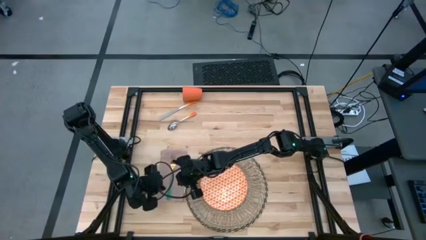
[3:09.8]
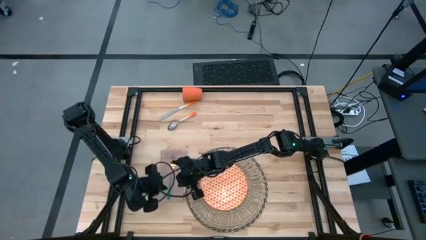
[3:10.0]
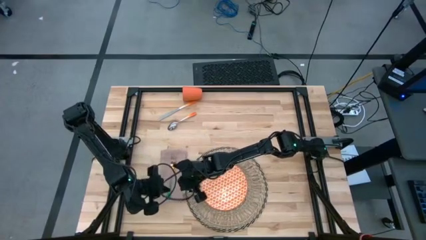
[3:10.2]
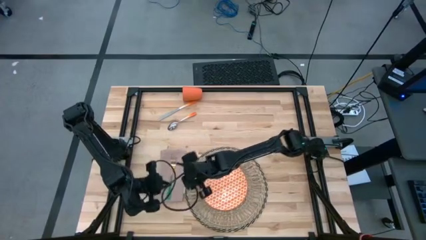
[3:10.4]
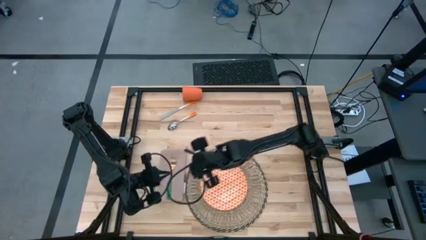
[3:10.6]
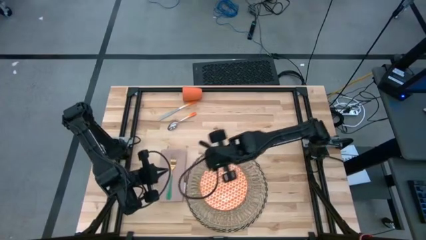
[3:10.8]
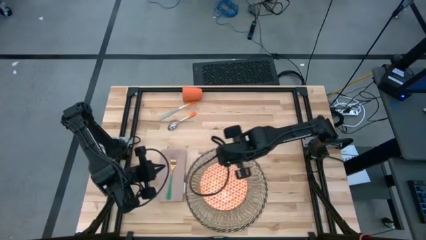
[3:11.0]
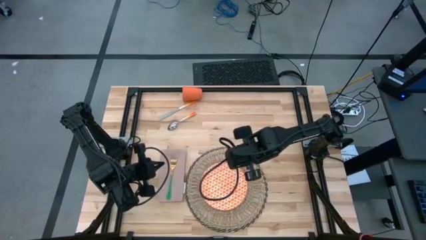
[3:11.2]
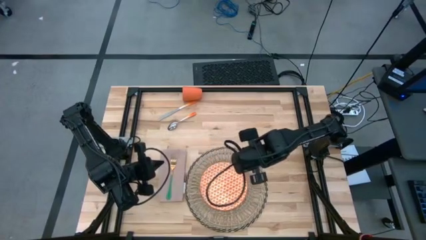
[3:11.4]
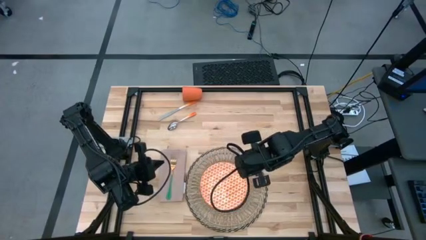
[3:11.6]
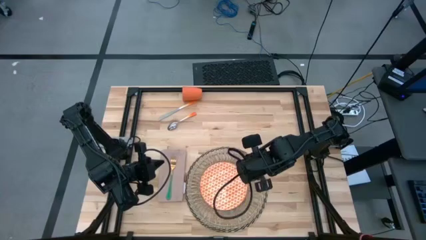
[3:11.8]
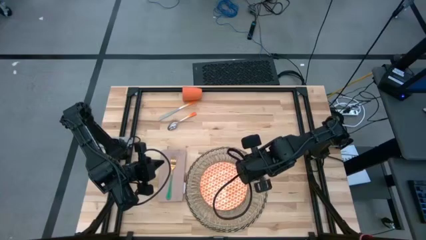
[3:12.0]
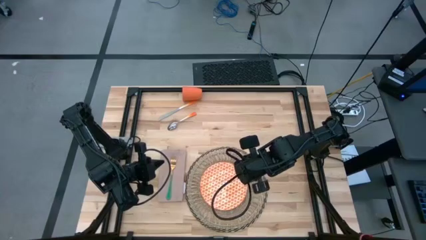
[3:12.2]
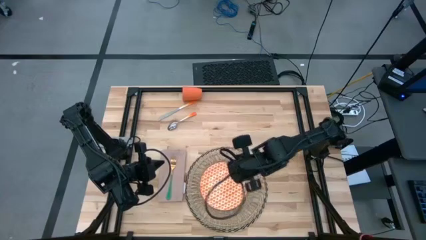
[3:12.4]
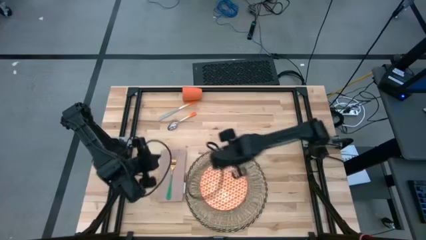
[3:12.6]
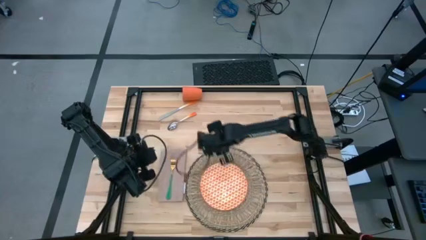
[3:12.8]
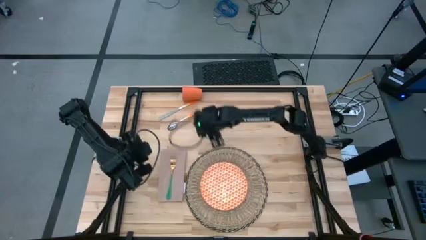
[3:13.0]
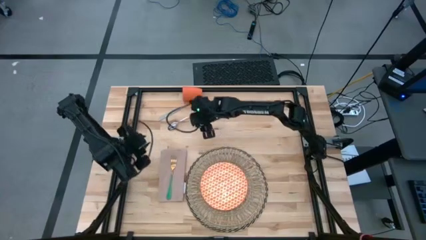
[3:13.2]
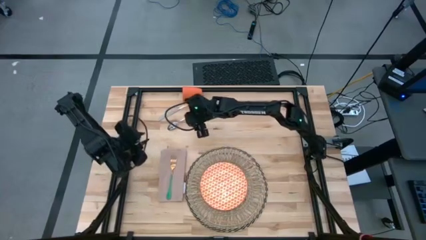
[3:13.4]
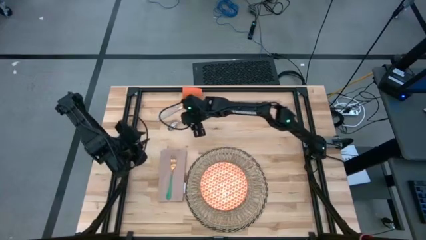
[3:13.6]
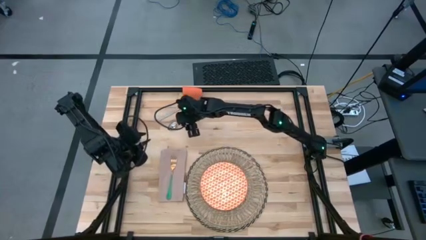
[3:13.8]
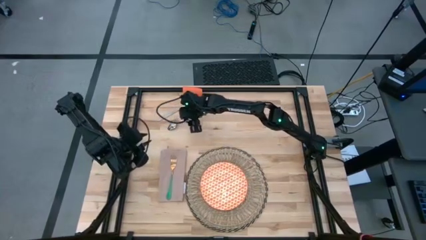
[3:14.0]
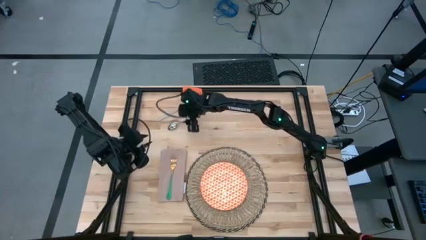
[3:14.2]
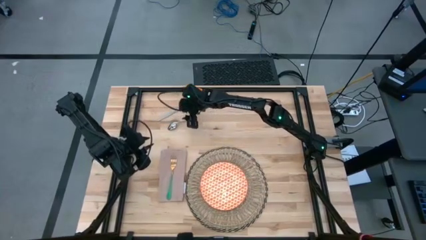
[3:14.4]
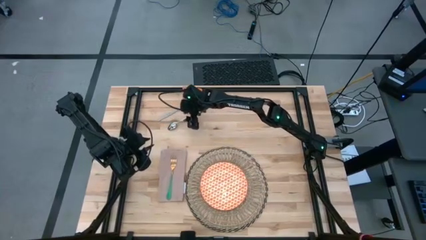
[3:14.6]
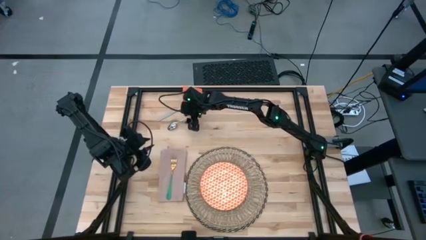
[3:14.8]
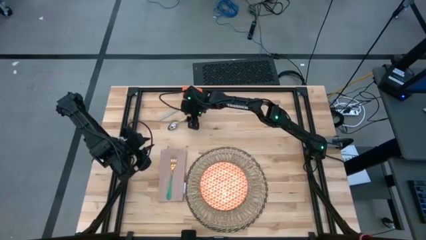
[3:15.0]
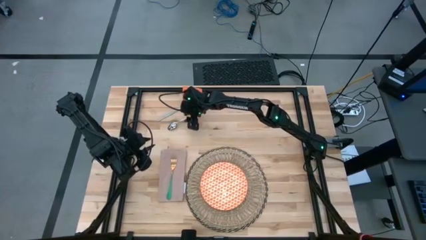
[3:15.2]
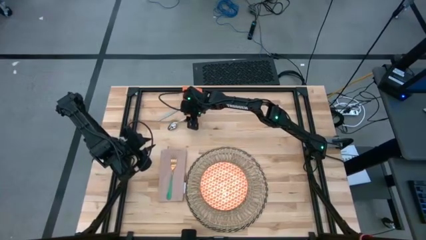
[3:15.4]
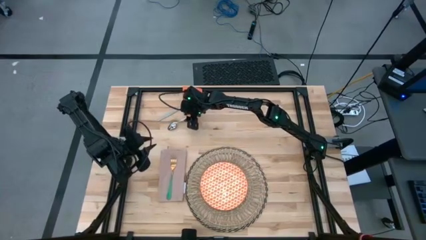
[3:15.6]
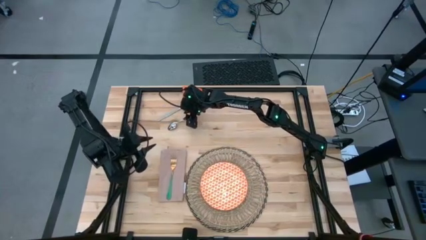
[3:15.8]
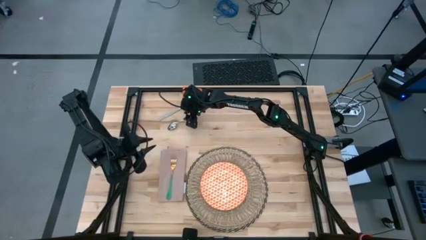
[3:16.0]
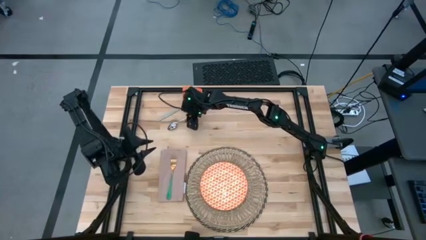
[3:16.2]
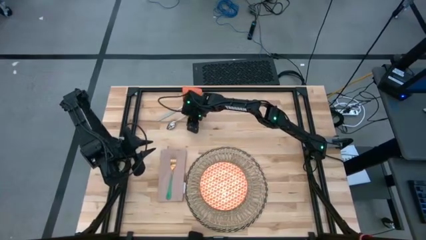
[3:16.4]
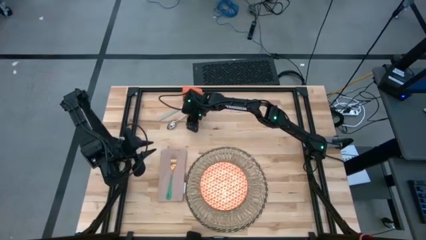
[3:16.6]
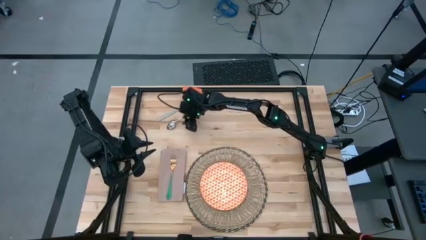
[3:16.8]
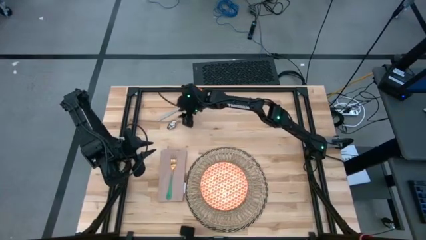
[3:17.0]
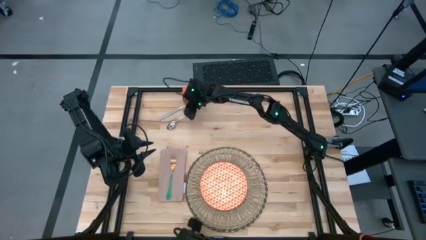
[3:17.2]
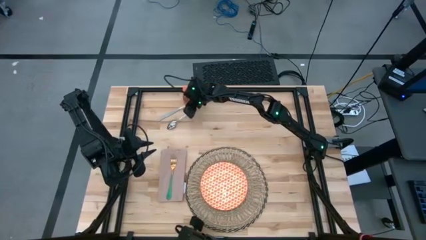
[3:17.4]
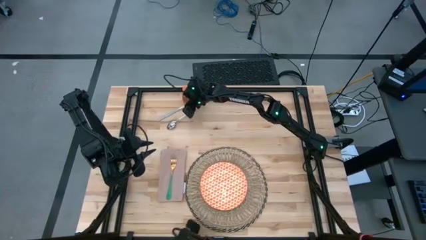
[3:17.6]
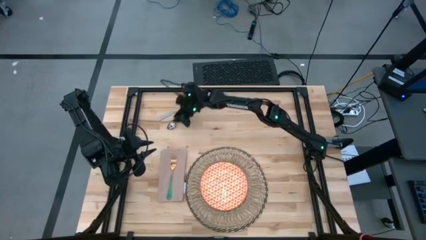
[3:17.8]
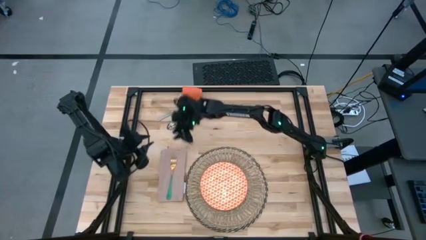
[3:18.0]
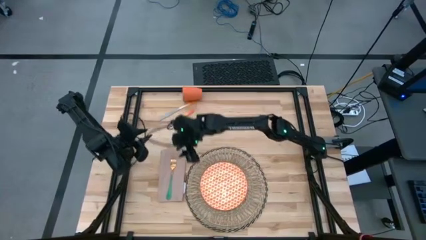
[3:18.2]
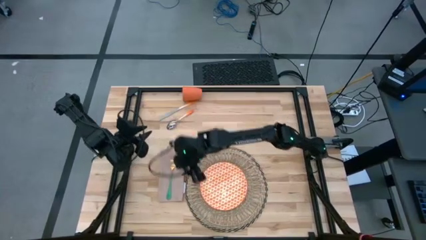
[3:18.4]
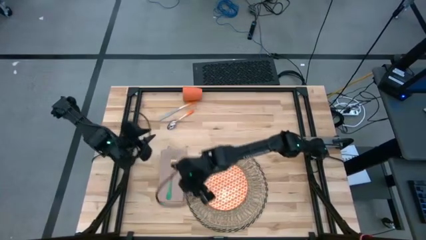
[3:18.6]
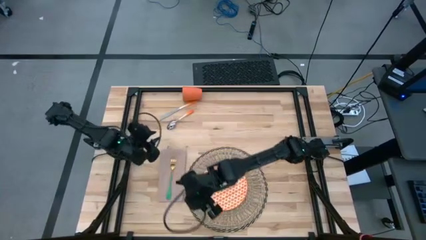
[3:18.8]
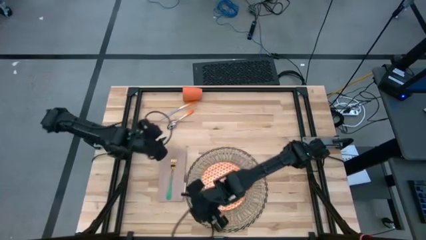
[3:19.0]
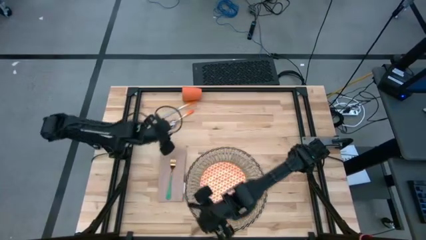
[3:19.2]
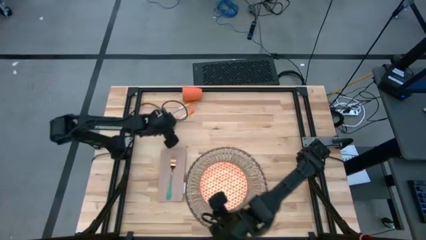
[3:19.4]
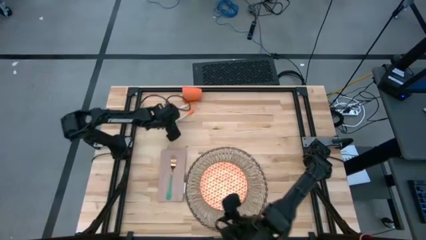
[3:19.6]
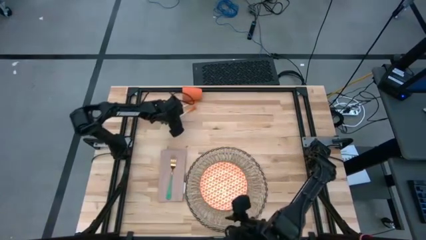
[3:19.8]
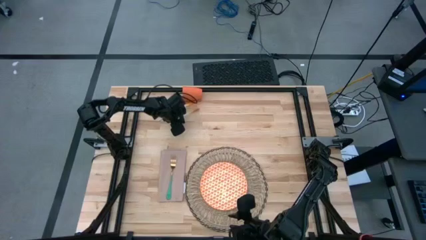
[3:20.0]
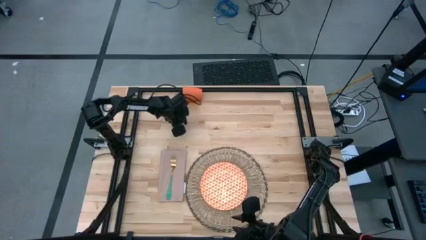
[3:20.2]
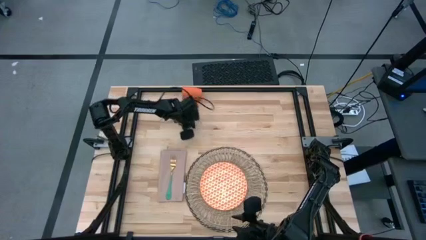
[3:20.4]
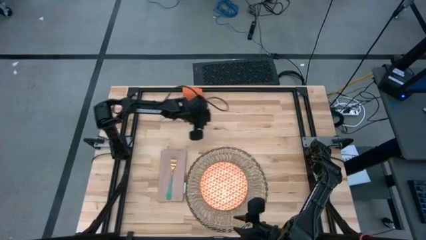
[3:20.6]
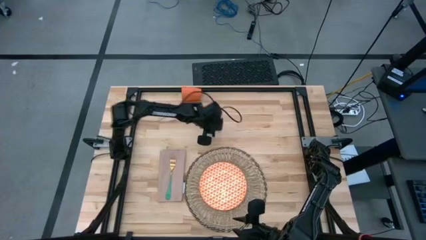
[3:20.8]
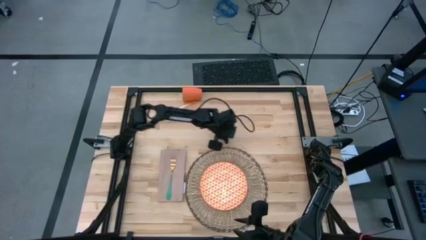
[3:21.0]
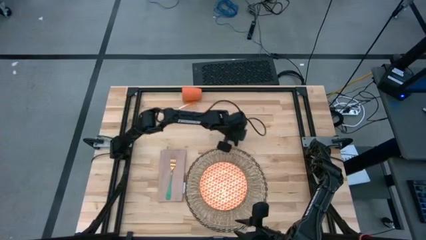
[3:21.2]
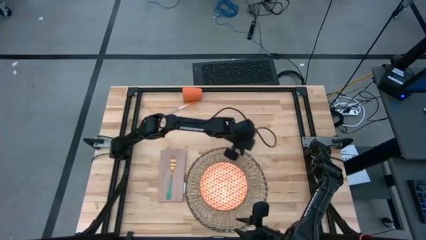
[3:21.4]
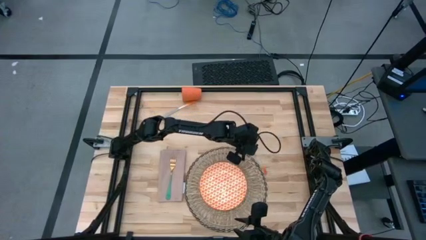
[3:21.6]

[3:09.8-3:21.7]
Task: Set table place
Move the spoon to the middle right of the table

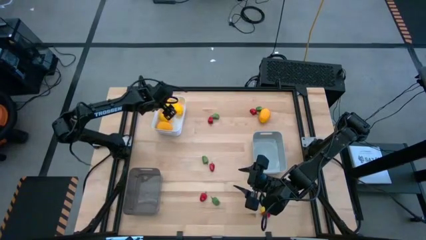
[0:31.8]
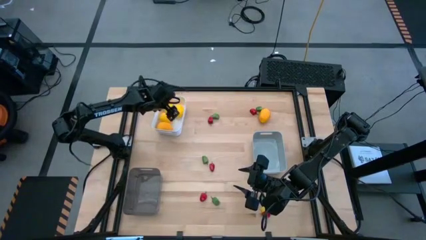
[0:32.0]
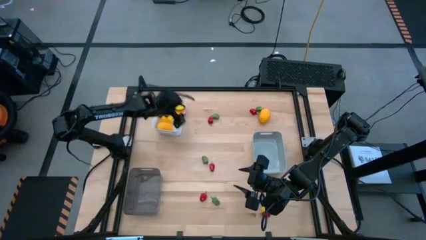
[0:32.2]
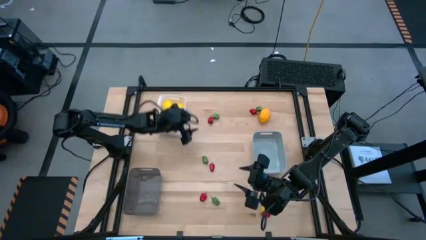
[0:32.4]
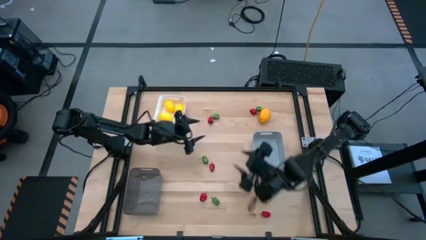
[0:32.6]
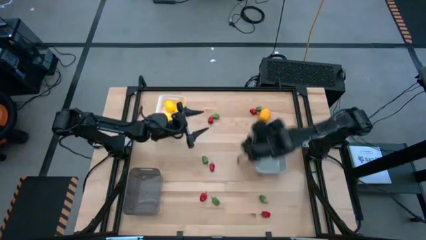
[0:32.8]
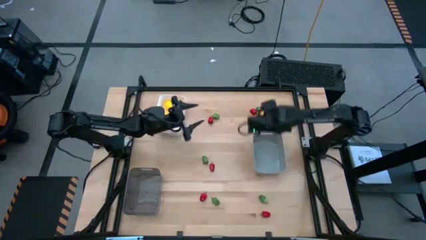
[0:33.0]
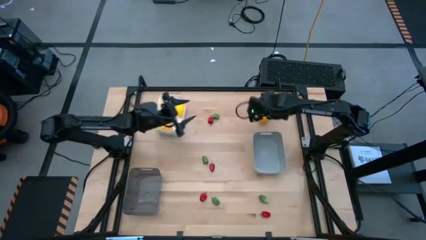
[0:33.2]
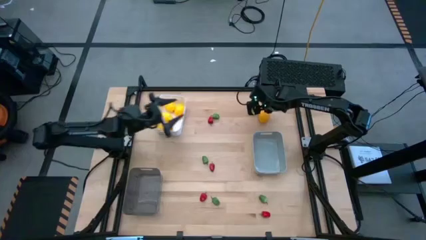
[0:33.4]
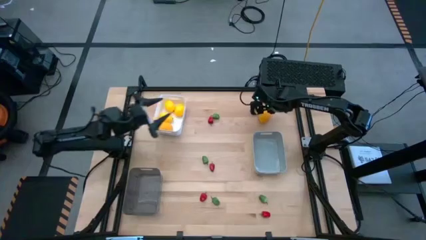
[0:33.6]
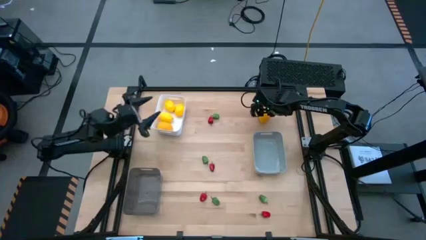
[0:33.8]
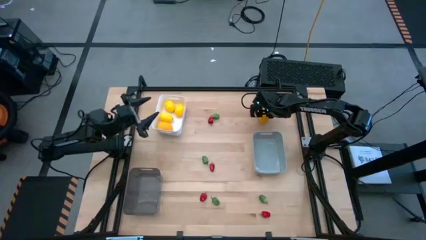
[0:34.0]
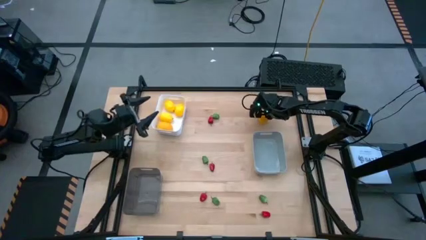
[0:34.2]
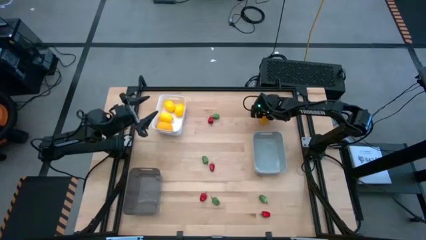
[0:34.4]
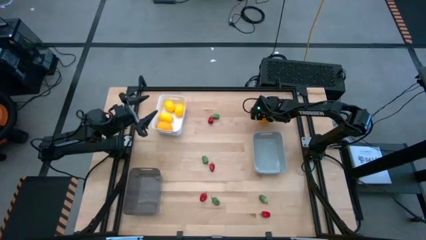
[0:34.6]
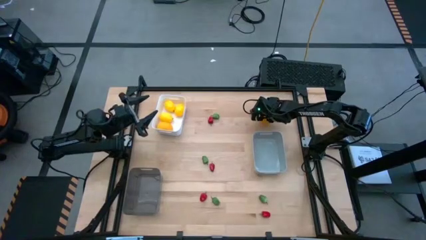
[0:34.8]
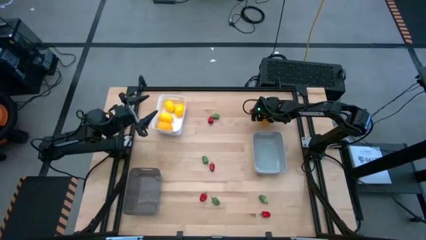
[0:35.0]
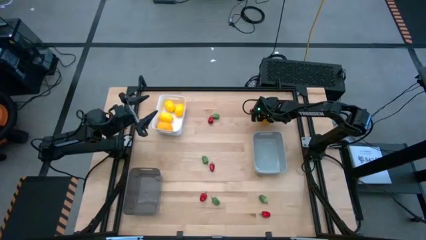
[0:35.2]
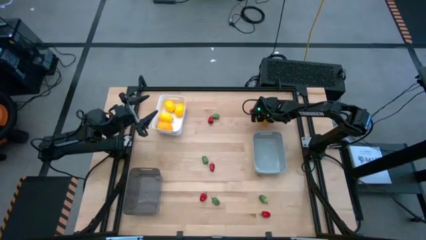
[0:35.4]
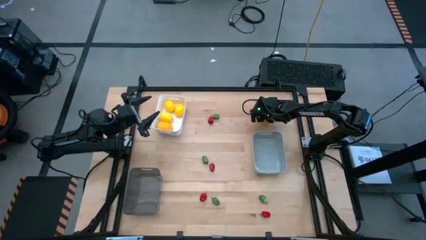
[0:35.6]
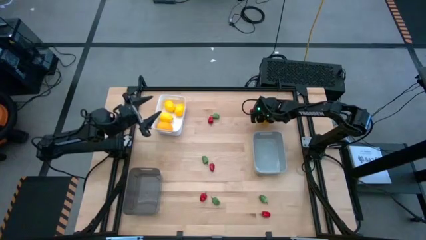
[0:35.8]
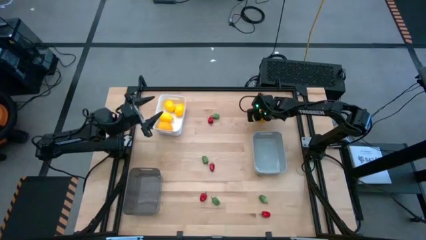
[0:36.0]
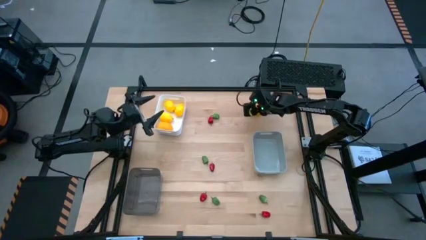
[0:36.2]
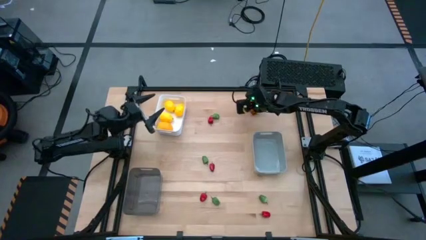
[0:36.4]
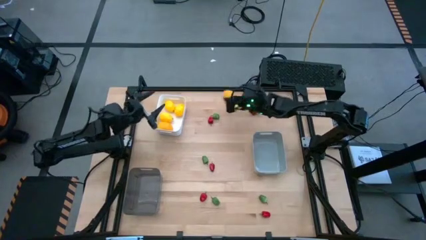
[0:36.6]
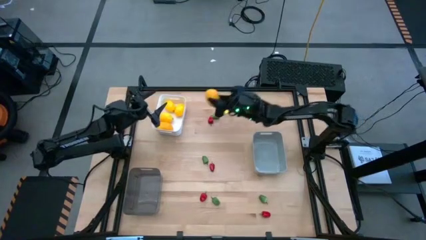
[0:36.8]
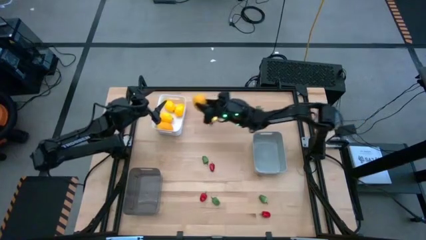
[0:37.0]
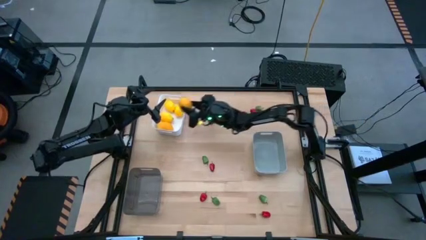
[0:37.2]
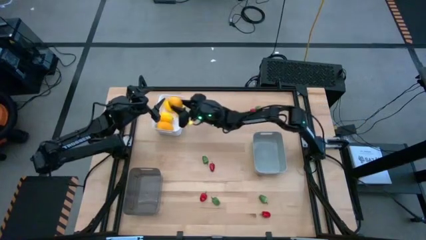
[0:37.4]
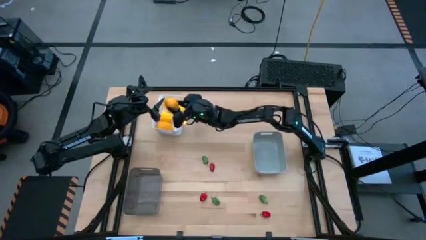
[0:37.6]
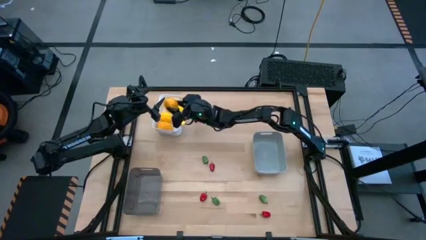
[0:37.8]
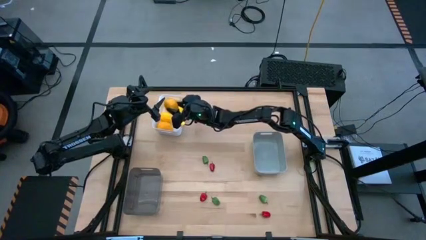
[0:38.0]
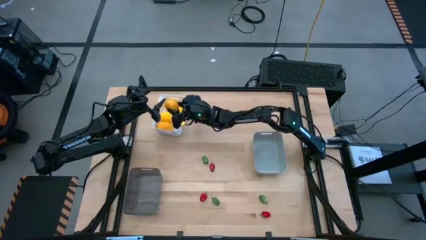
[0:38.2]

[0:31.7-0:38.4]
Task: Sort produce into baskets
Put the yellow lemon into the white bin
